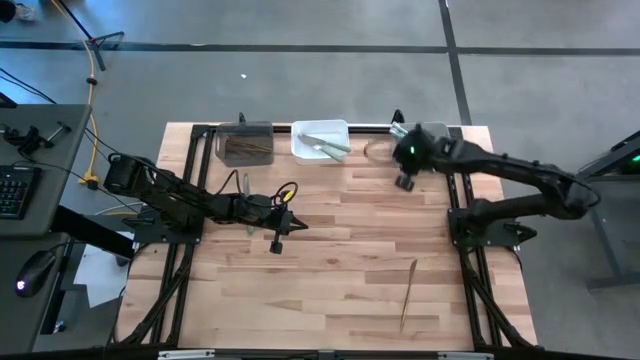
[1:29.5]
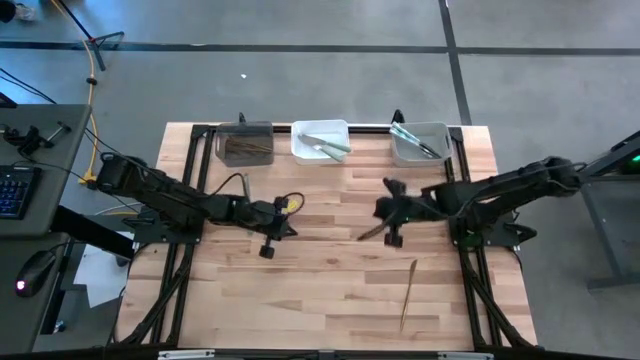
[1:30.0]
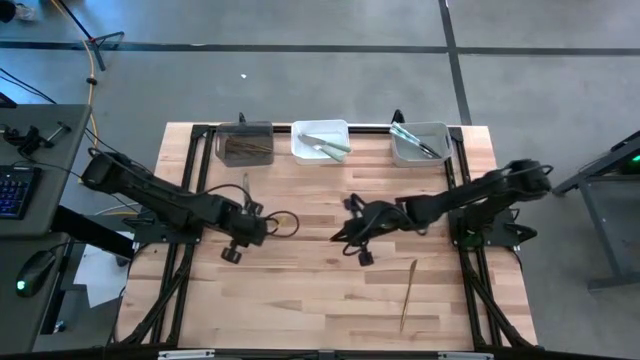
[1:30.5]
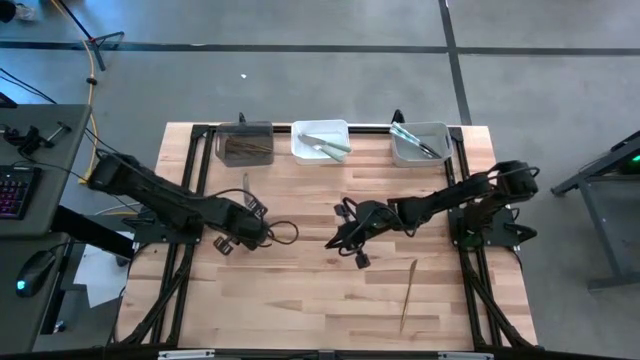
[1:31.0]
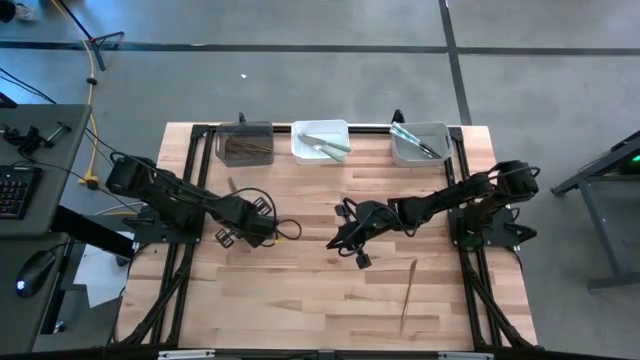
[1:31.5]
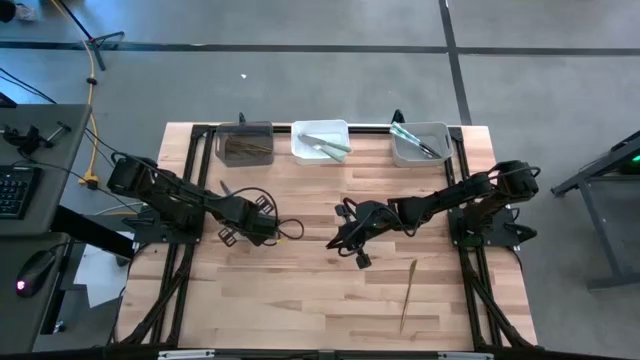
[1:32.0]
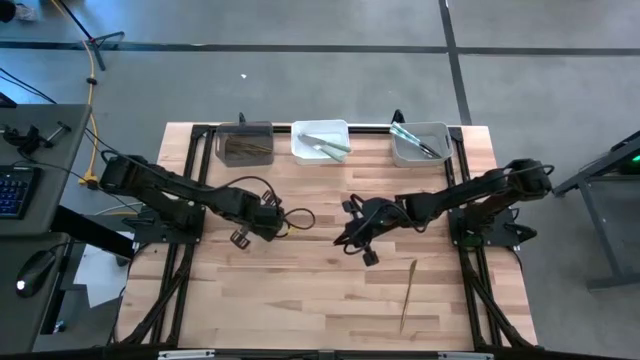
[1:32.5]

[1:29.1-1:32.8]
Task: Sort silverware by color (type)
Put the green knife into the white bin

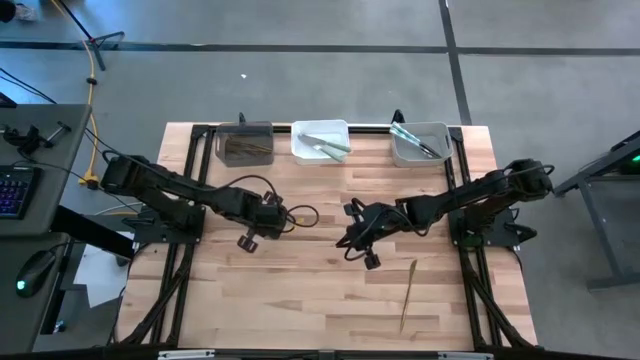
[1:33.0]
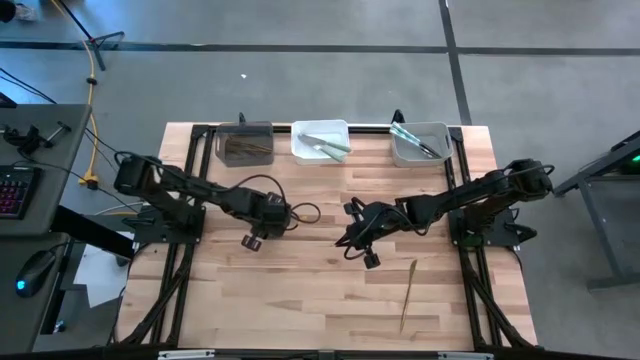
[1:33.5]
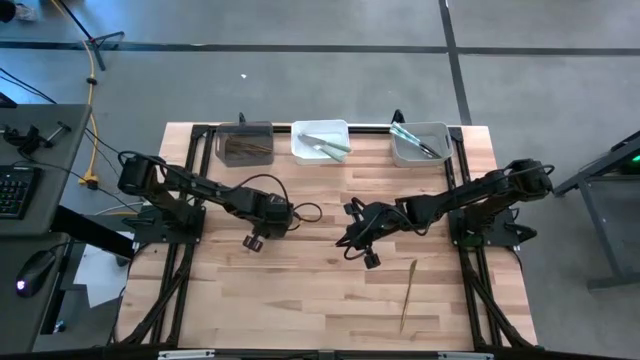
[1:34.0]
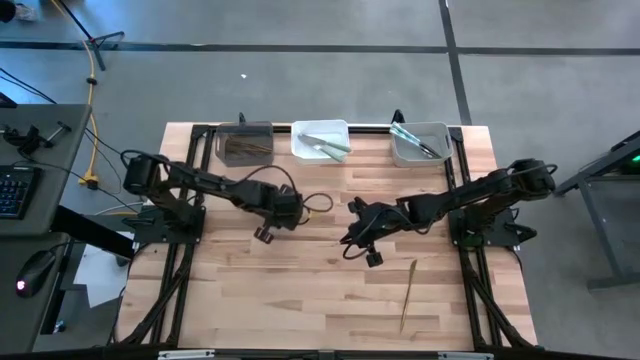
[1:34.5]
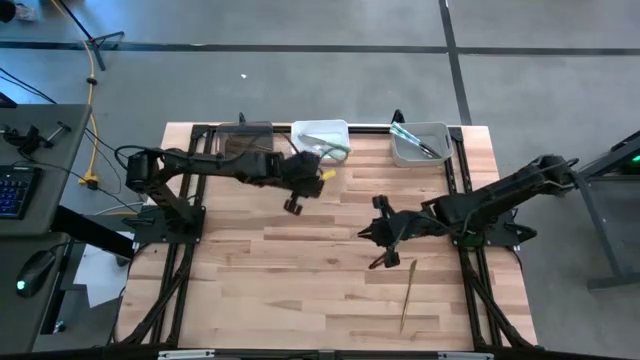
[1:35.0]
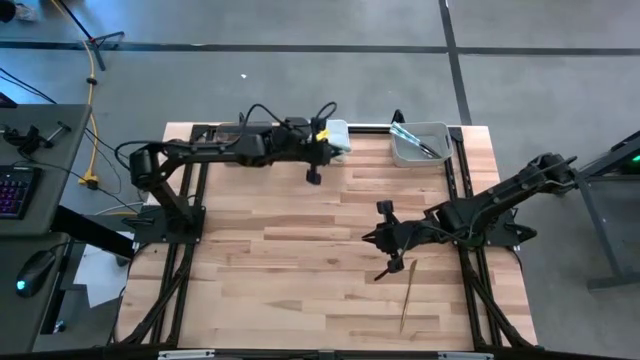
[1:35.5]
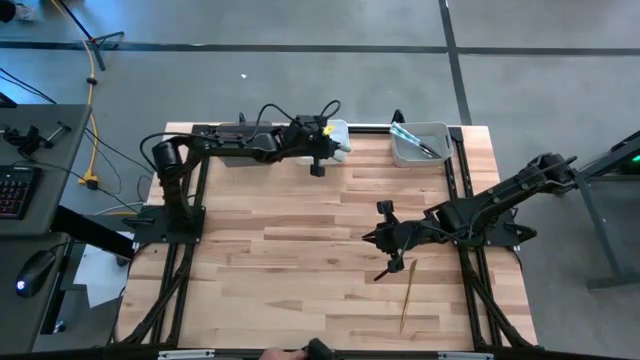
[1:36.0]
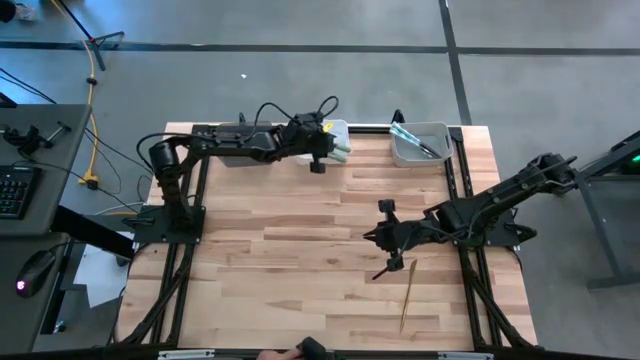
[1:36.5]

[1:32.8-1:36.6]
Put the green knife into the white bin

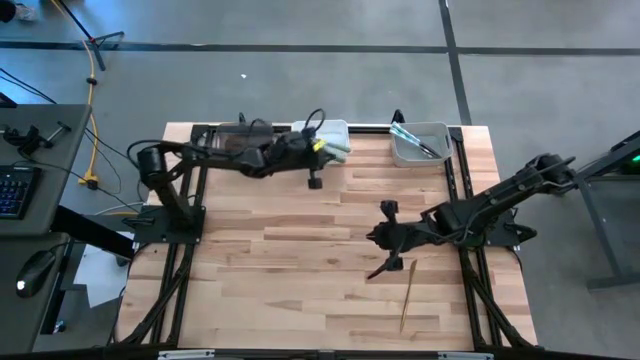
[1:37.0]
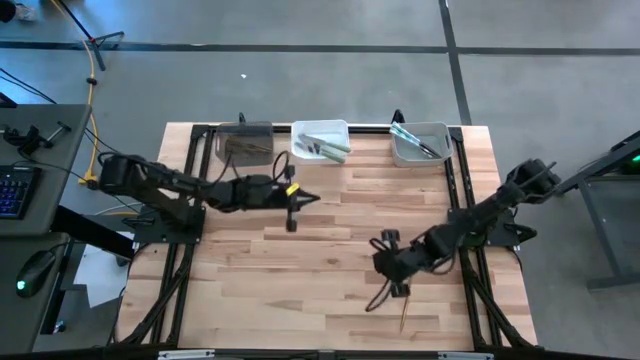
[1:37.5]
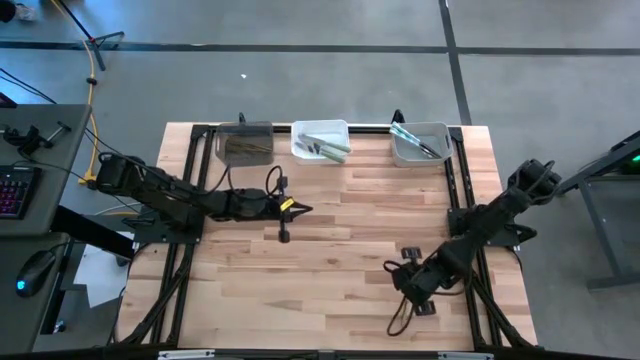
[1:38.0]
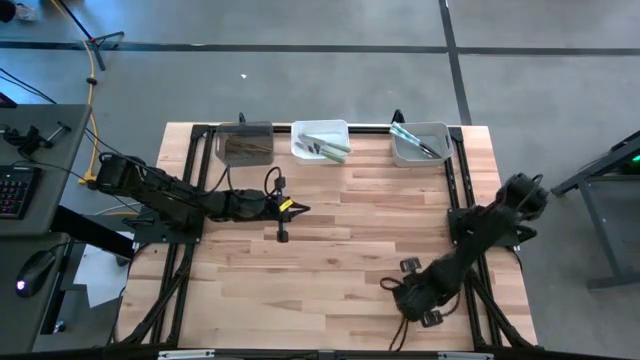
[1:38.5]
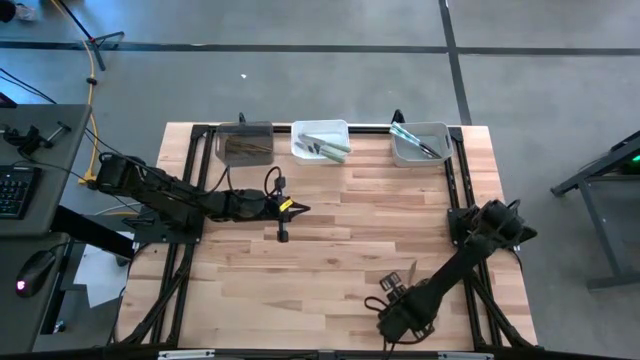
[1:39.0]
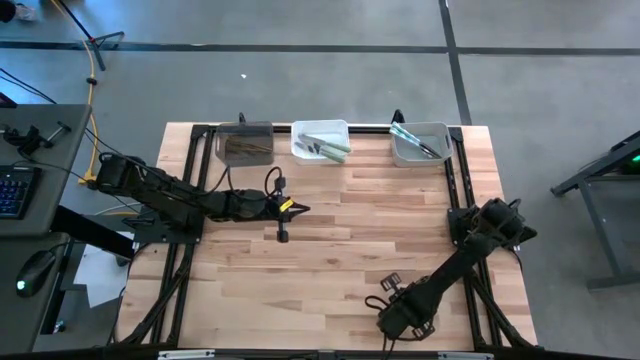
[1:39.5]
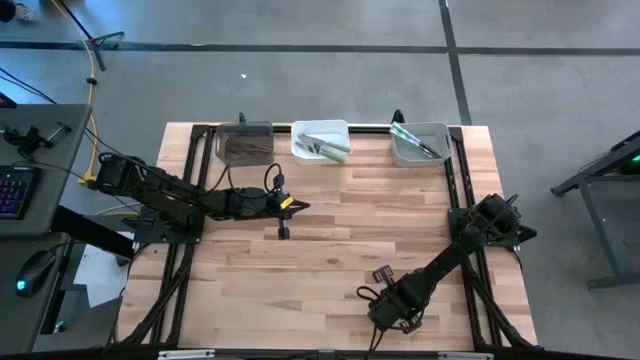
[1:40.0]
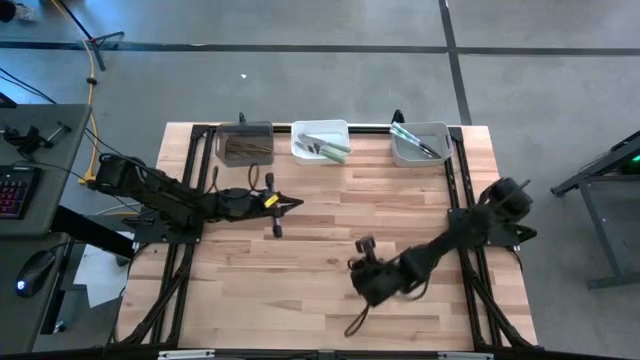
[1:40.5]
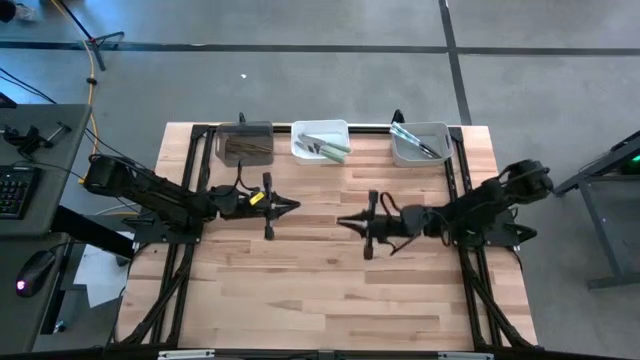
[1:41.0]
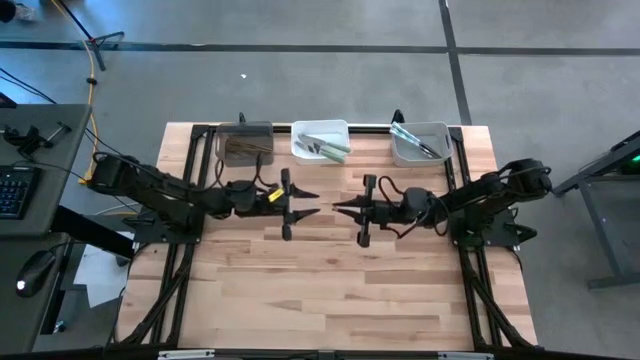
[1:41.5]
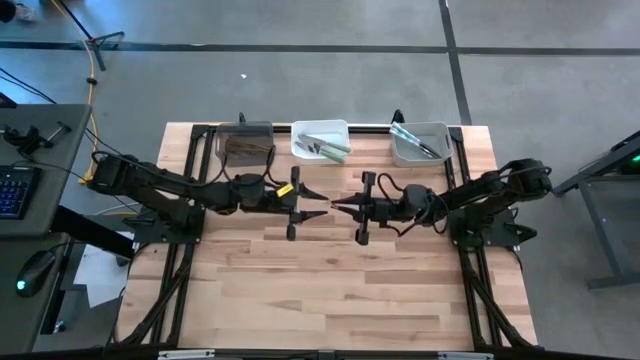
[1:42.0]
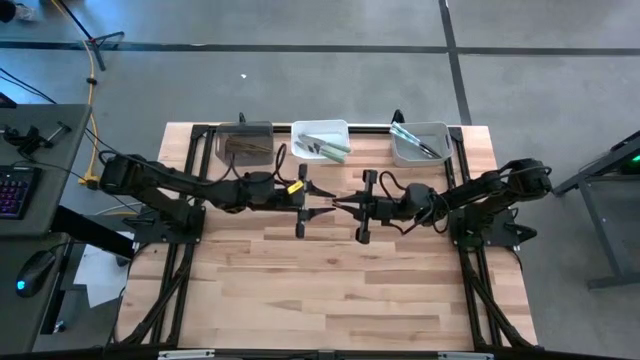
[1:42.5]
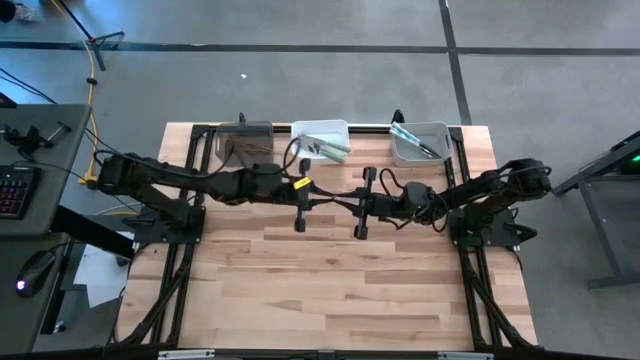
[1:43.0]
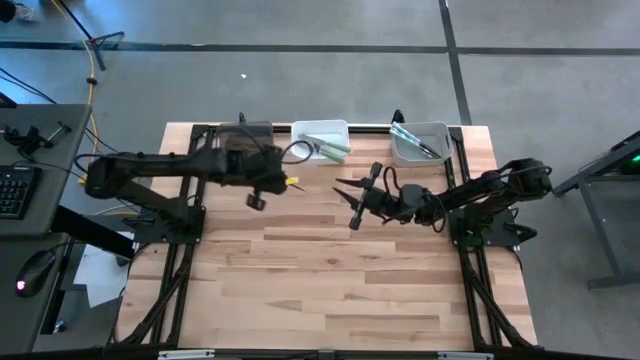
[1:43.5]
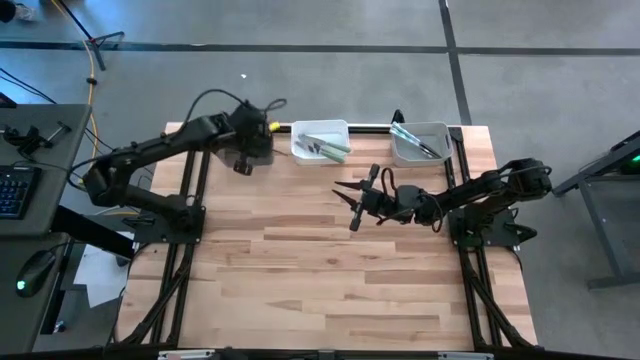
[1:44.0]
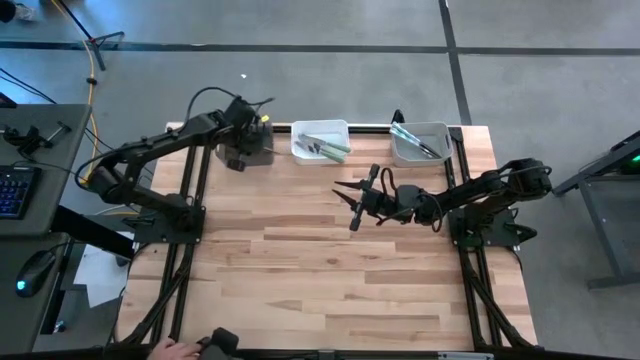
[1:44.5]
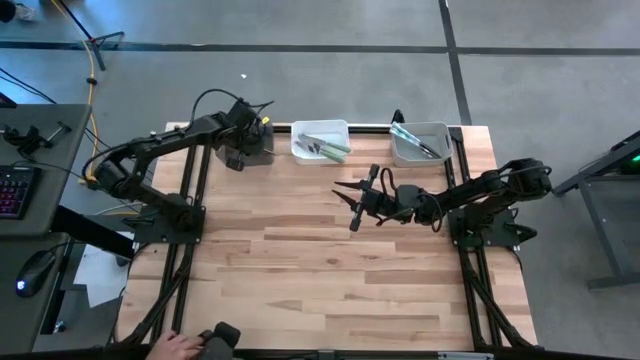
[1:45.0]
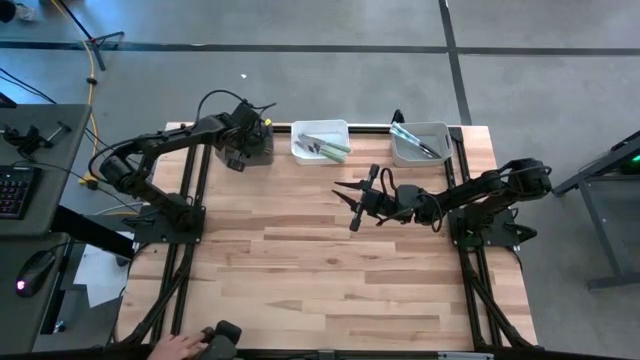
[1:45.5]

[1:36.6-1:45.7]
Put the gold knife into the black bin

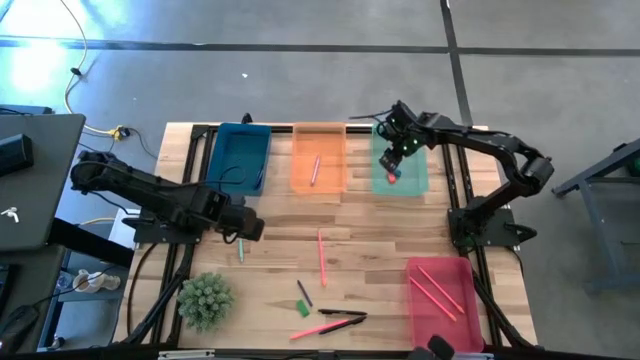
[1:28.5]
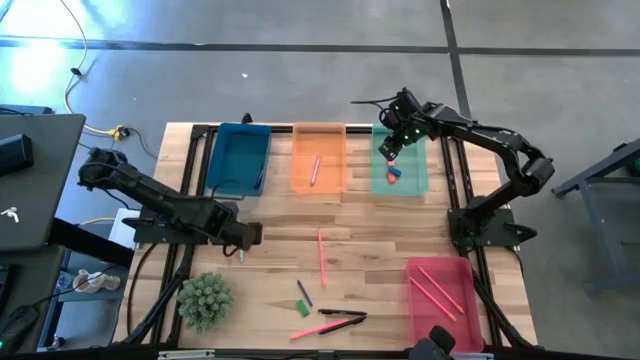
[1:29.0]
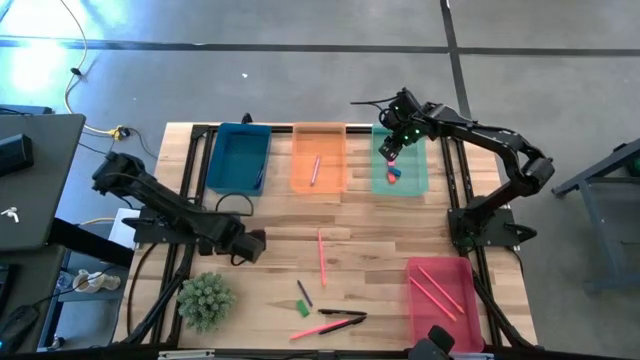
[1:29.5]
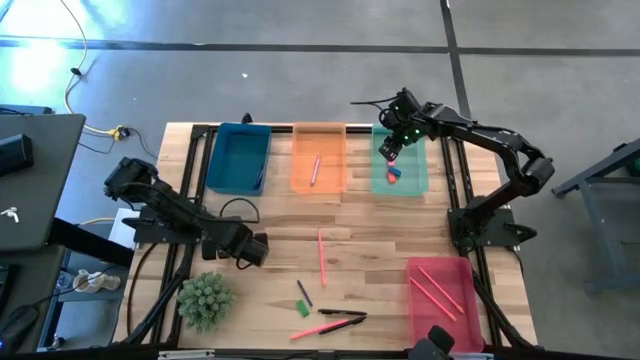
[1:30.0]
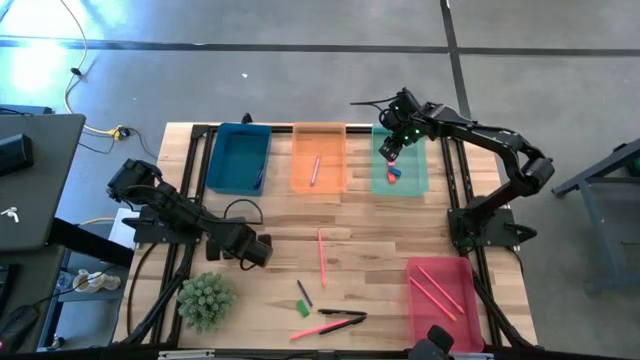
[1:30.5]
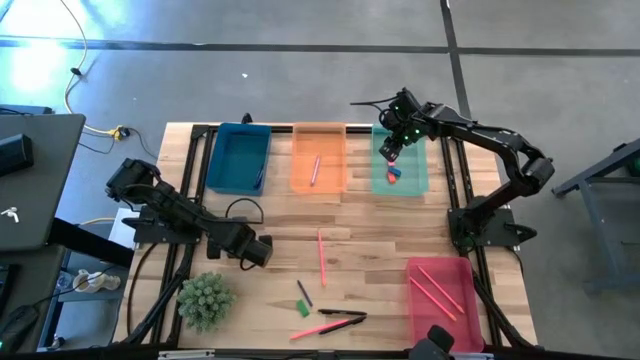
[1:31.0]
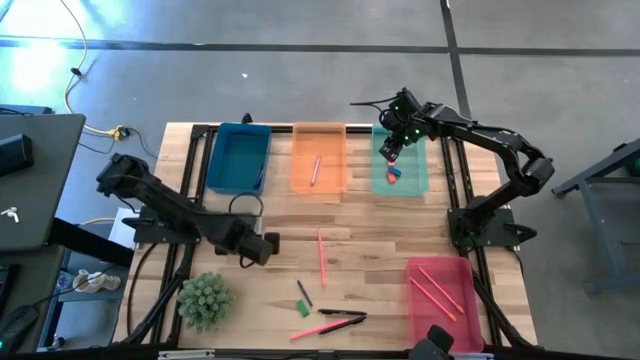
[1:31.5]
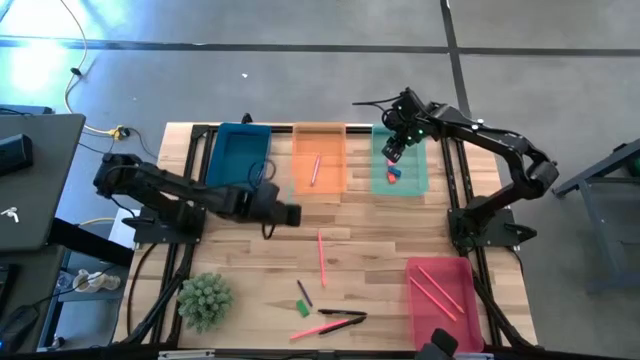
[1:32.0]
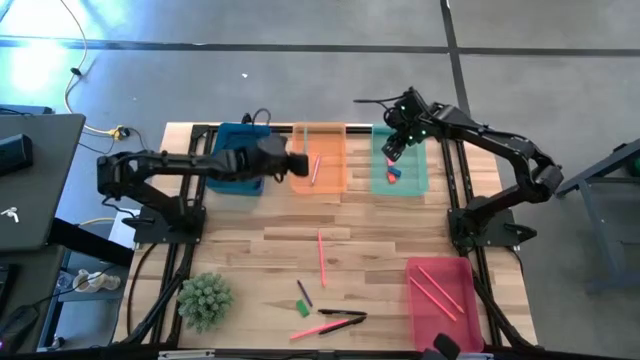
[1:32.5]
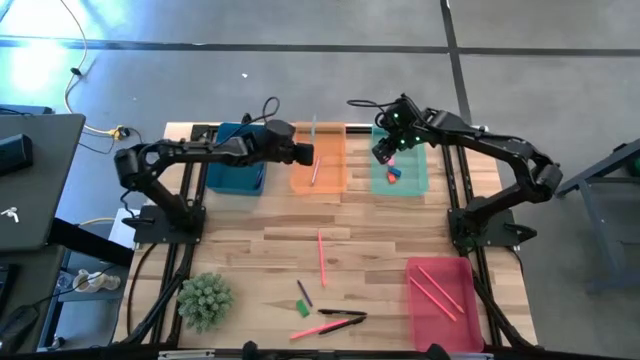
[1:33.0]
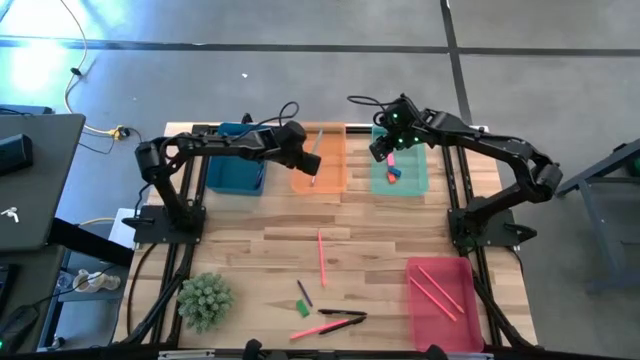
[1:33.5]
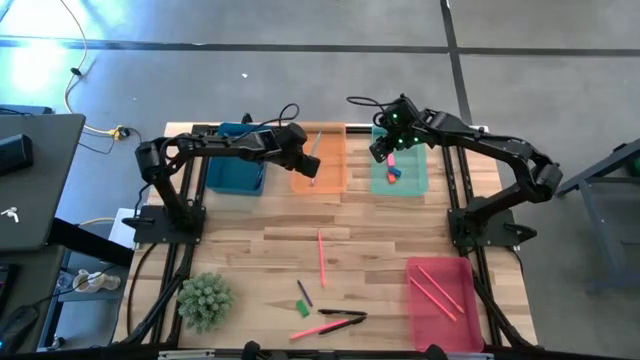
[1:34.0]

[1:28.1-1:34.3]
Task: Sort crayons/erasers/pens/pencils in bins
Put the light blue ballpen into the orange bin
